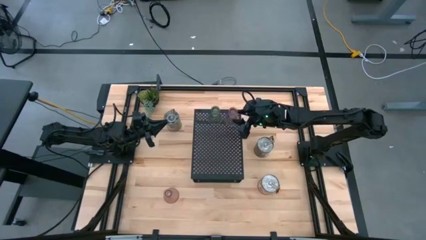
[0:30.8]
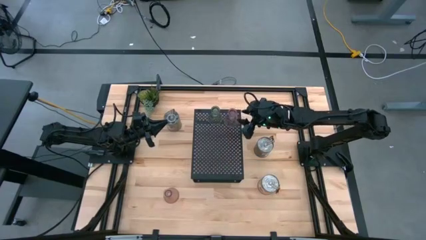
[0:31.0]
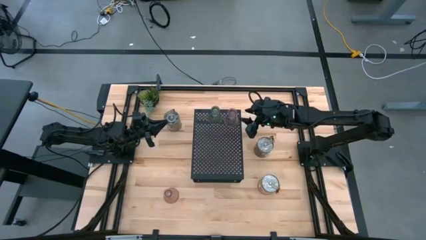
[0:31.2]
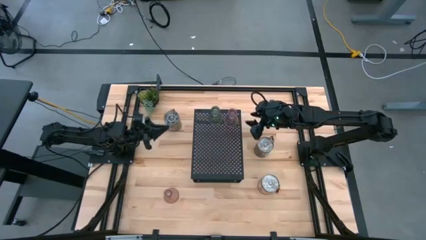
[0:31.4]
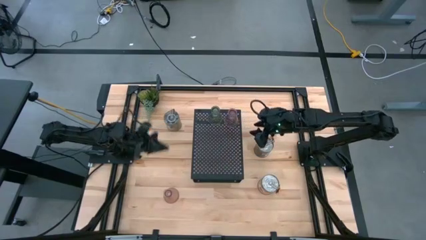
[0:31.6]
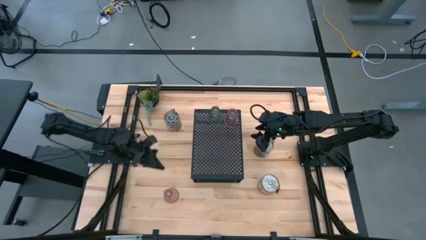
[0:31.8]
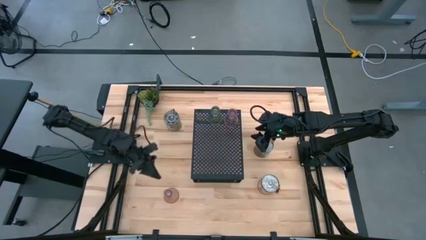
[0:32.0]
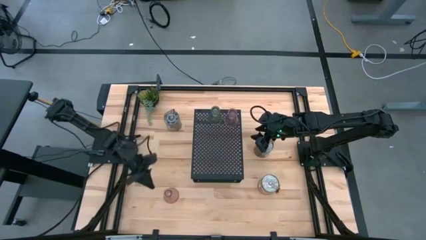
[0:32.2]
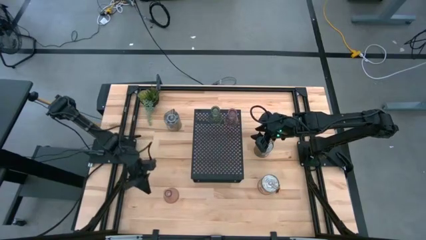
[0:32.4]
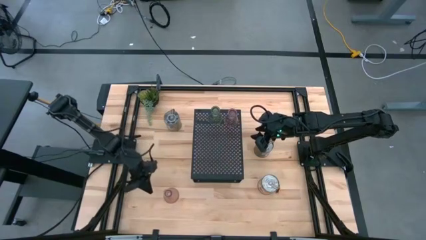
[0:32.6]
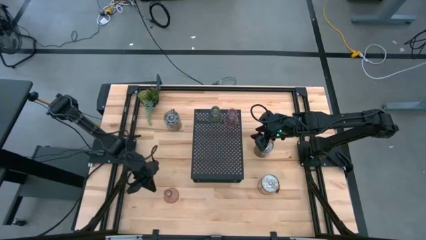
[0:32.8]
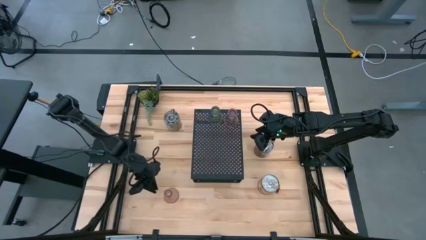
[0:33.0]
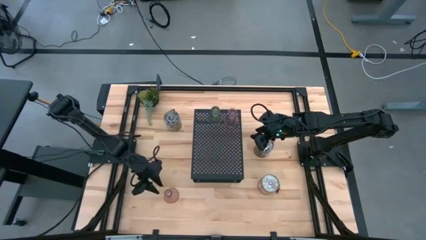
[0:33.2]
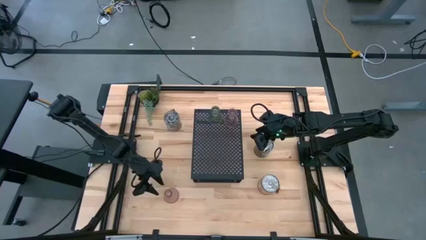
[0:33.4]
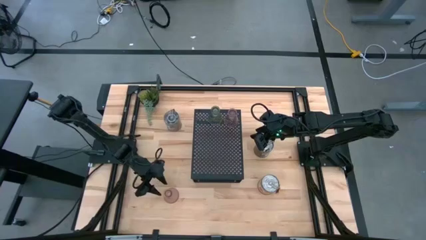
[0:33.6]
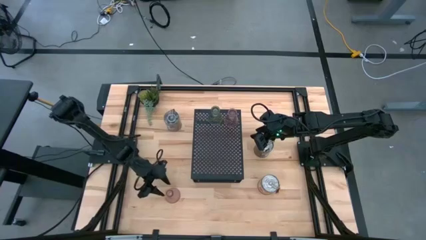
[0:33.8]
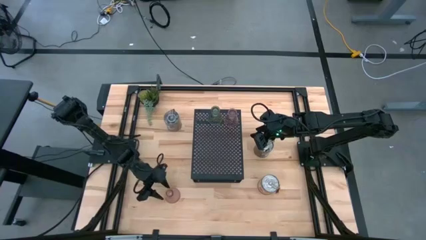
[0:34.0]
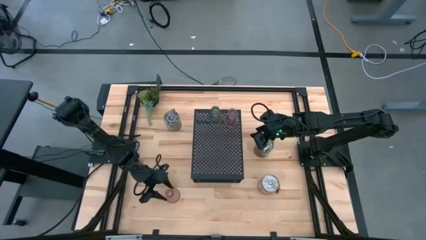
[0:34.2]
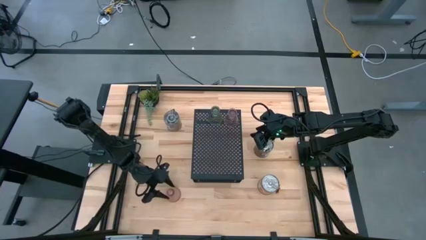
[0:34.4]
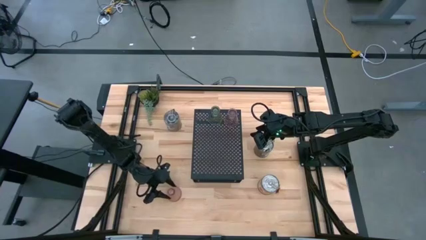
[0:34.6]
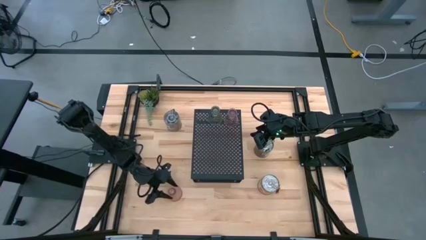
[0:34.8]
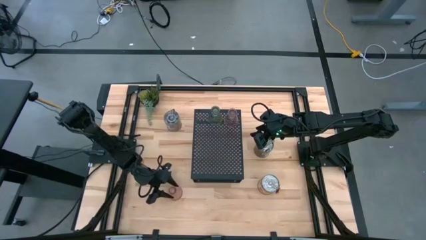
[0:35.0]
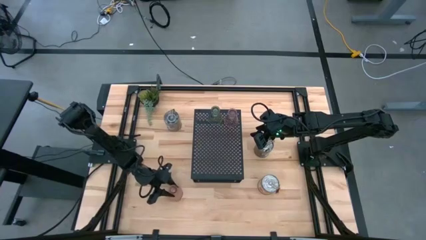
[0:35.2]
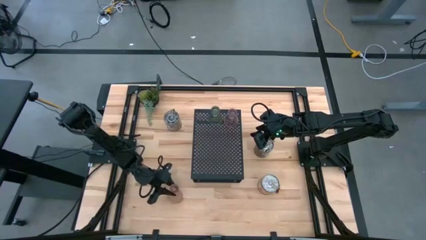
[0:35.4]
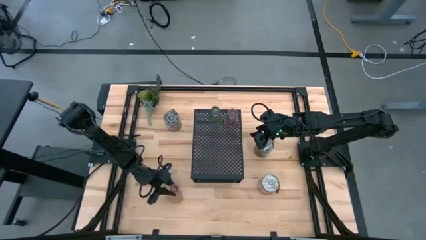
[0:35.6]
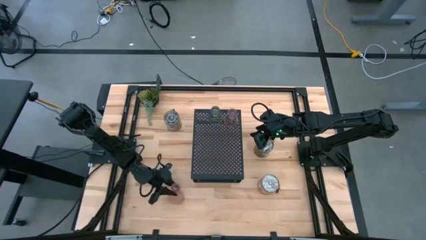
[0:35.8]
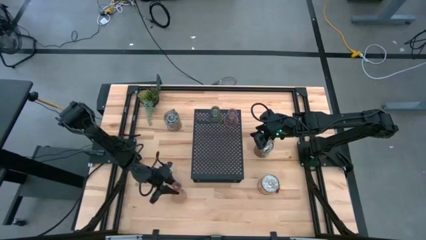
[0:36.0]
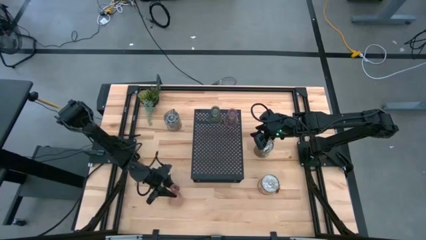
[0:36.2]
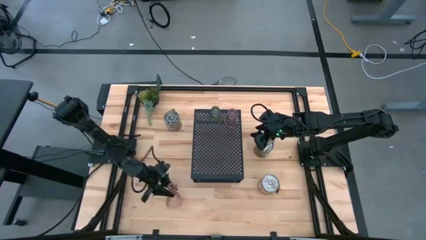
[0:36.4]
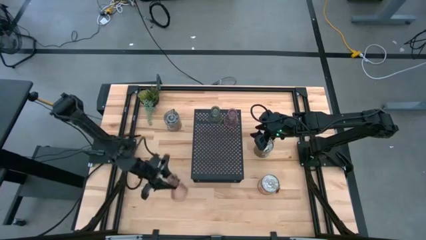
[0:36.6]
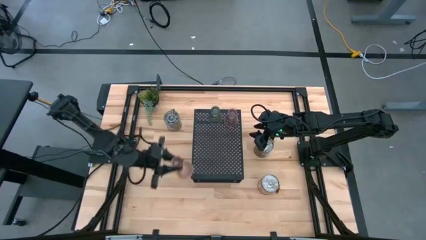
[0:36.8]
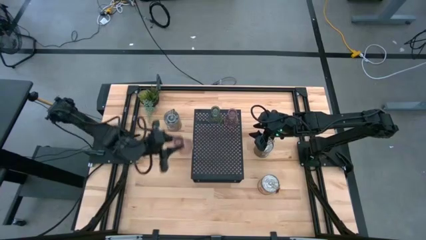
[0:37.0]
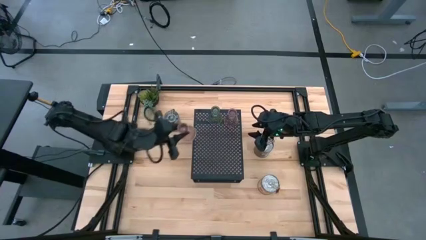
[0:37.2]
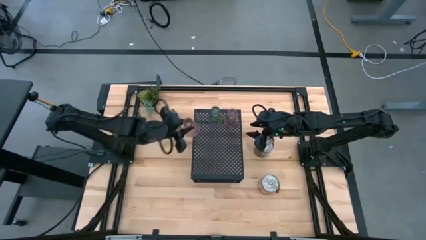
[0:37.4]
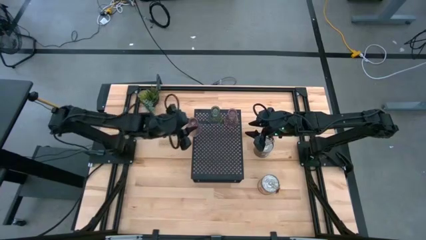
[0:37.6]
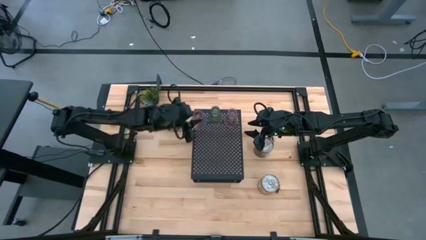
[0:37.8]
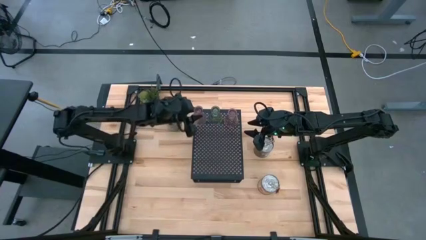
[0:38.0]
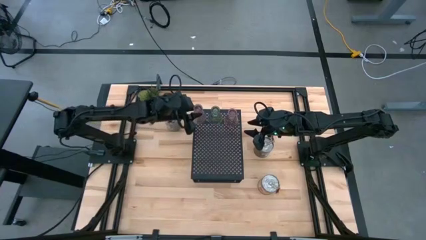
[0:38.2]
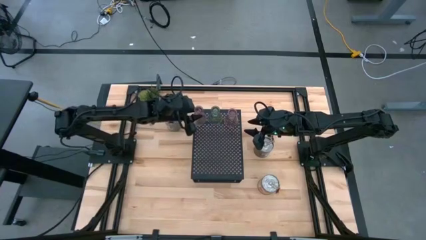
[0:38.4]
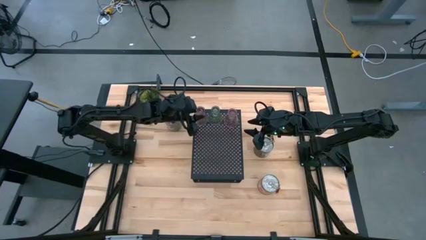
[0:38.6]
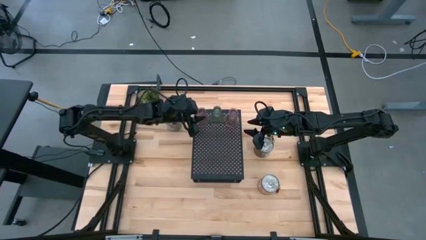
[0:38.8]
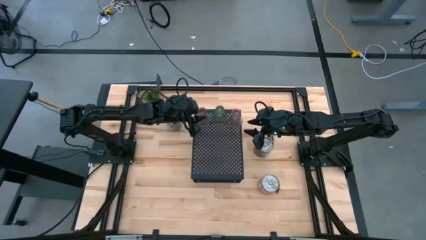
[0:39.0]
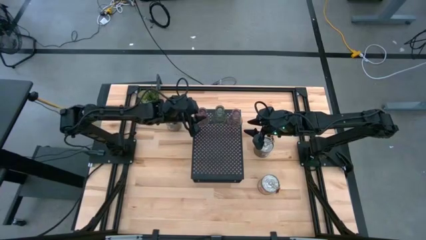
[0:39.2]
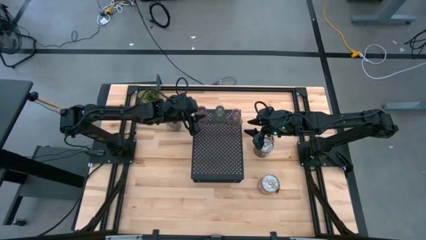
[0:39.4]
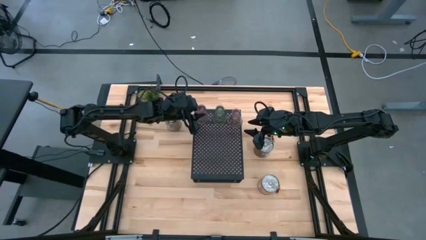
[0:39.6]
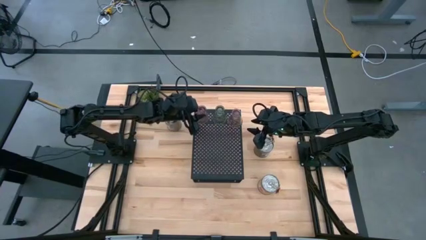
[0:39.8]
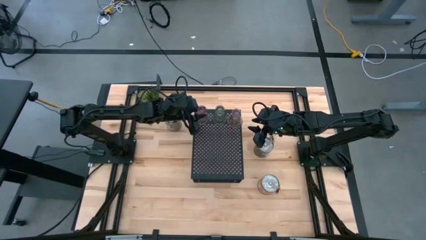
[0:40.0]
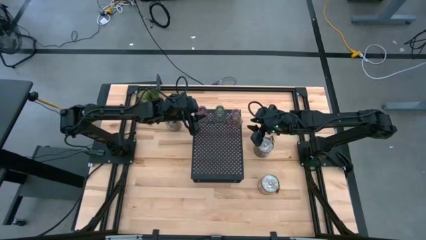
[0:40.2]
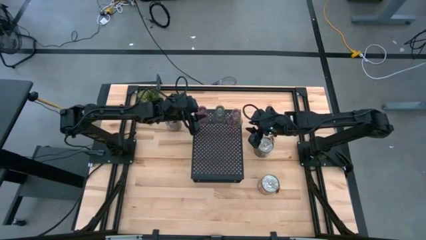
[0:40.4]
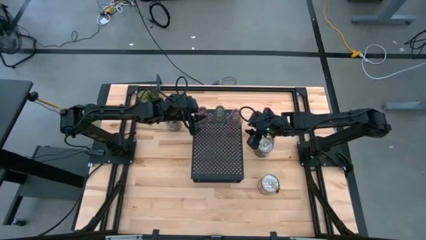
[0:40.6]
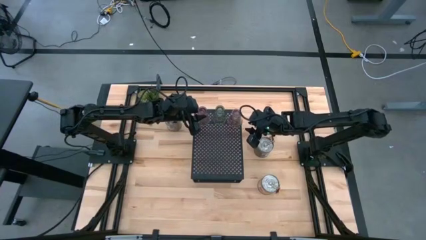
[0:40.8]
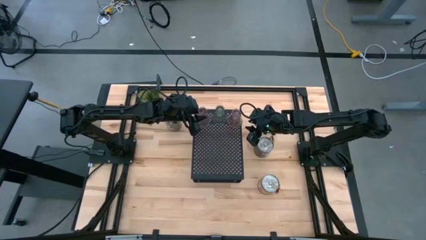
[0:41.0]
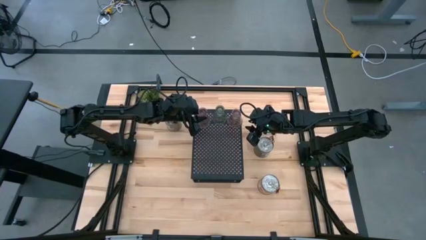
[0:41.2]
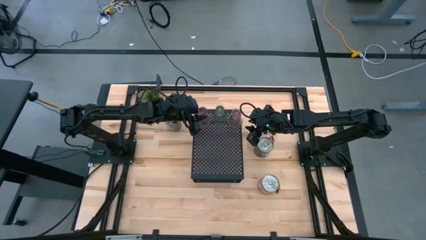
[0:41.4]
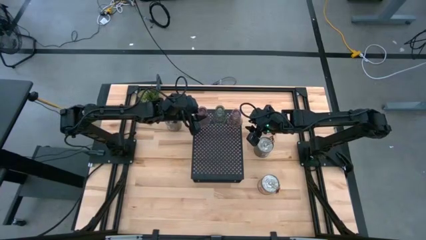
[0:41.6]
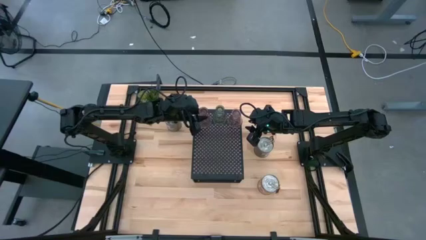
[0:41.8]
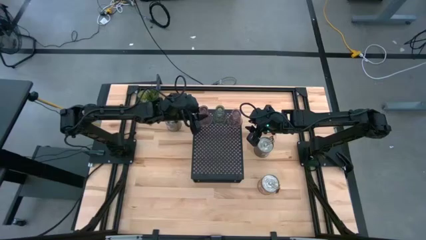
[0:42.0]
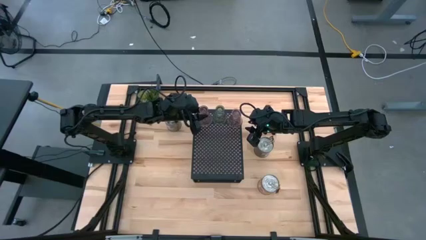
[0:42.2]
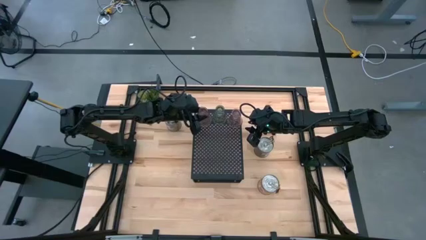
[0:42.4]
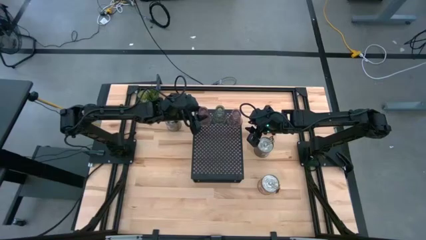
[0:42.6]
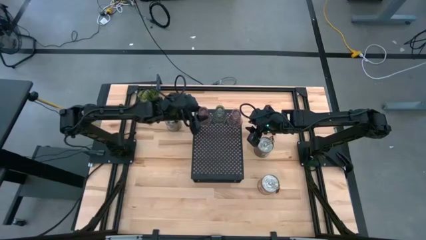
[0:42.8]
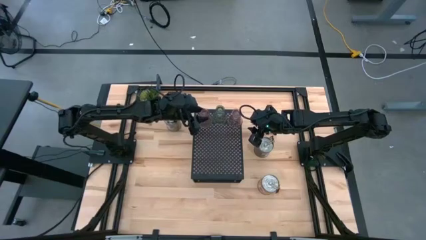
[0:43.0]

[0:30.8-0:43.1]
Task: Pick & Place candle stick holders
Put the pink glass candle holder on the shelf

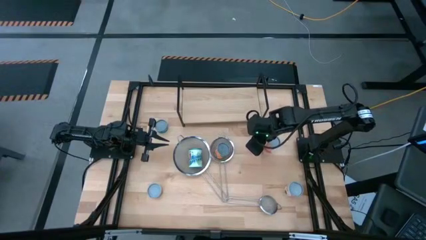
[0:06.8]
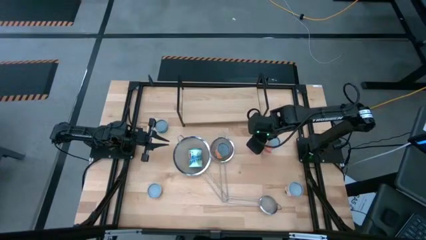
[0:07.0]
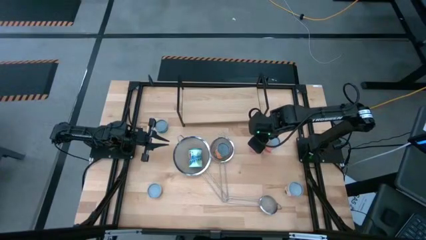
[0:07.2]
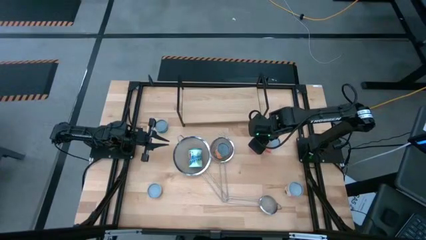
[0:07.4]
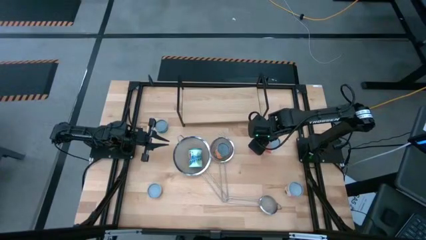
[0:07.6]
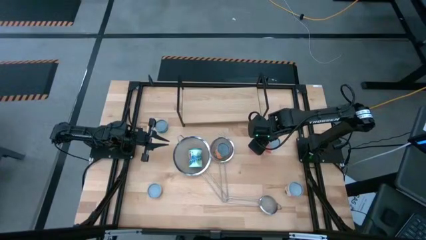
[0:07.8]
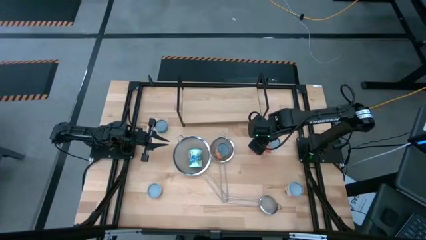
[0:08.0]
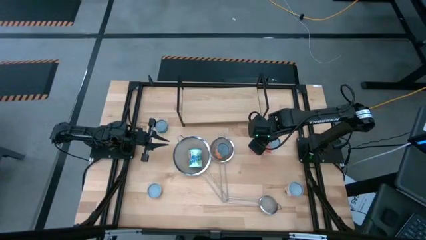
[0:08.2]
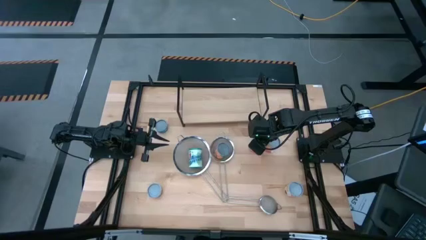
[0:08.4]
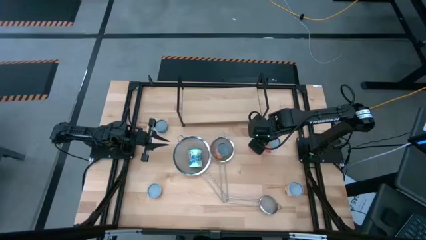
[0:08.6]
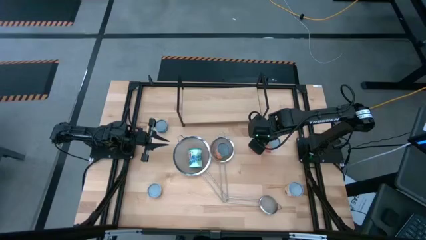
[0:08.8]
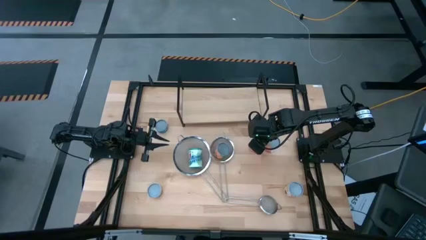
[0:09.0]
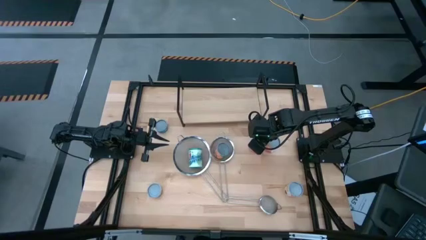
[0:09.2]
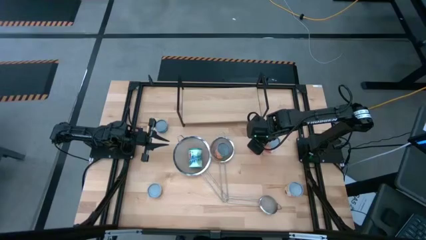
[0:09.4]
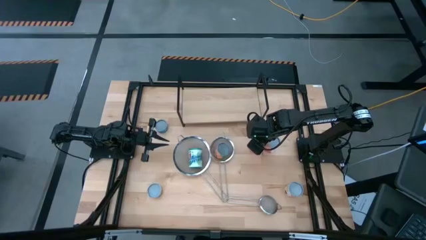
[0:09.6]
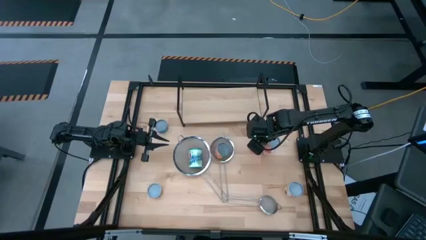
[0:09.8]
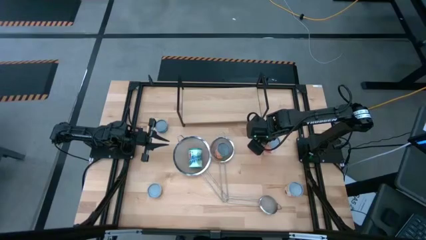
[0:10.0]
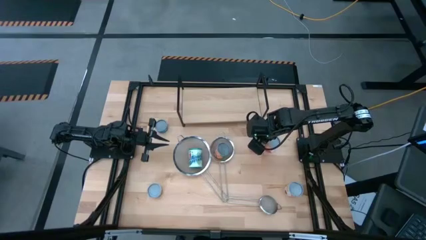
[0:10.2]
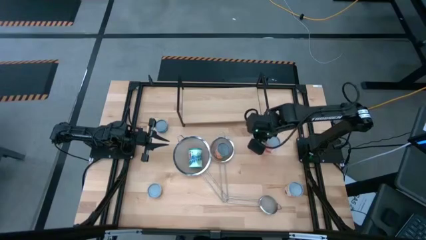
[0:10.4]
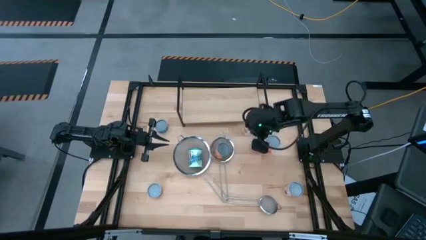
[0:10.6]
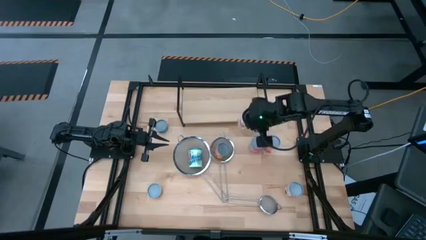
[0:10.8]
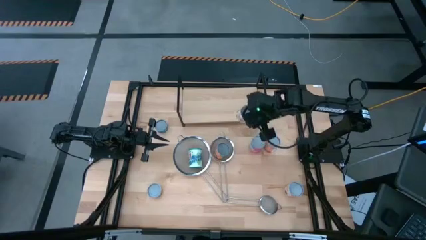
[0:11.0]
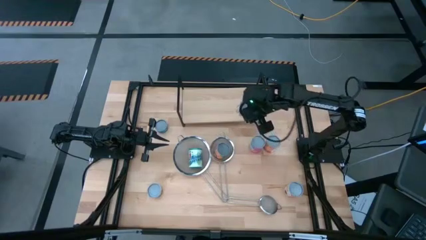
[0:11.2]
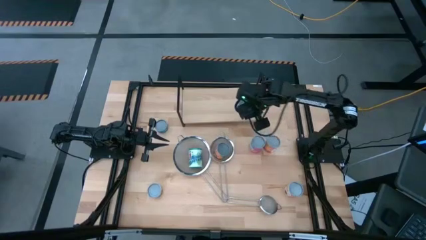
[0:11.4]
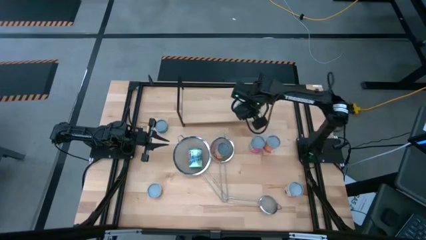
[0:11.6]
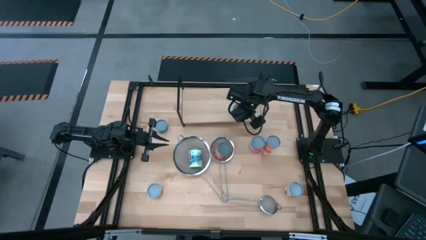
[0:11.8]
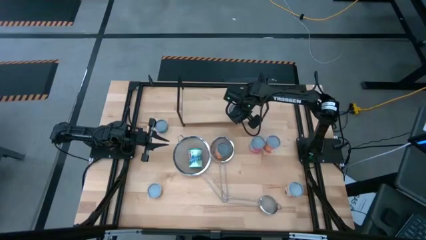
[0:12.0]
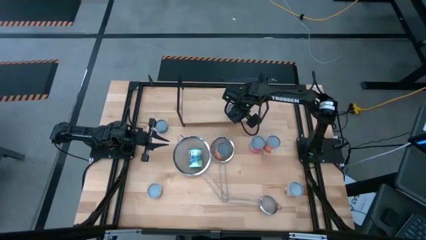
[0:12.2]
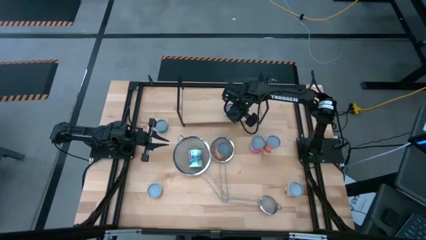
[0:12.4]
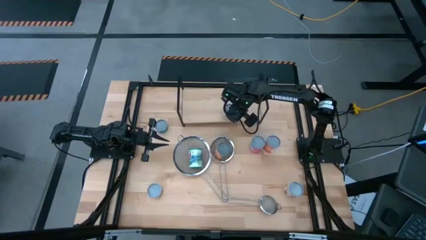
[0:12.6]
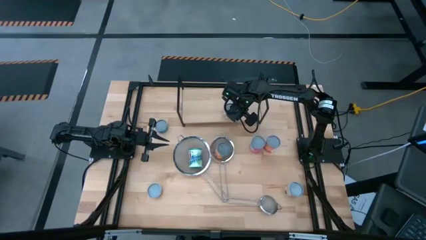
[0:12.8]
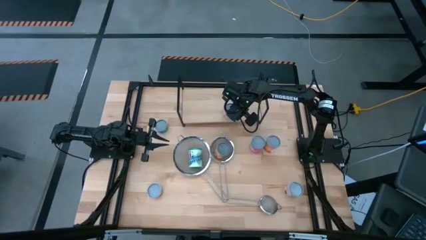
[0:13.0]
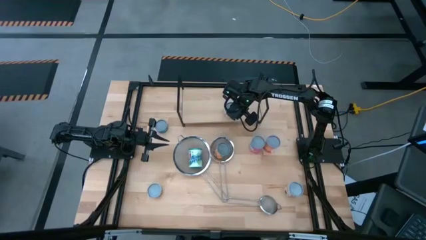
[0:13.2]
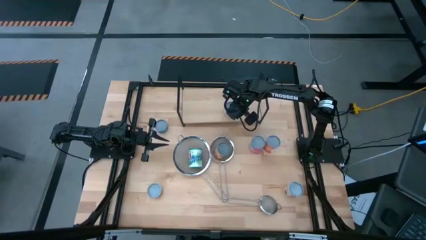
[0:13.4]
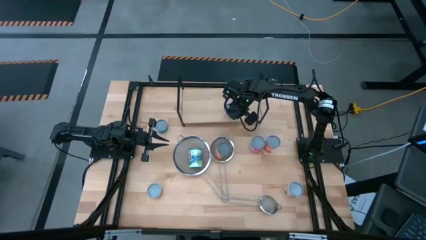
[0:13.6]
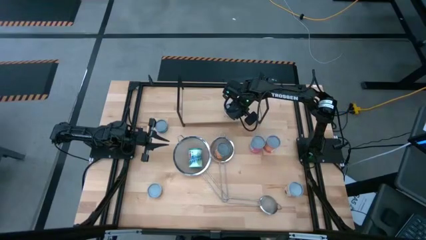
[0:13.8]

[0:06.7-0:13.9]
Task: Pick and place cans onto a shelf
Put the canned diced tomatoes on the shelf
